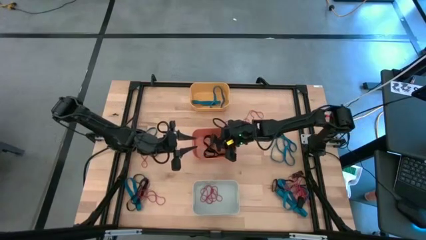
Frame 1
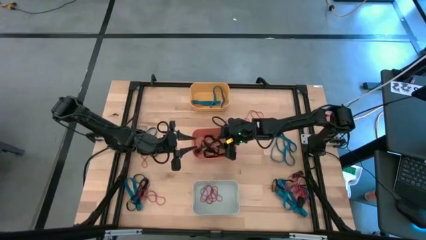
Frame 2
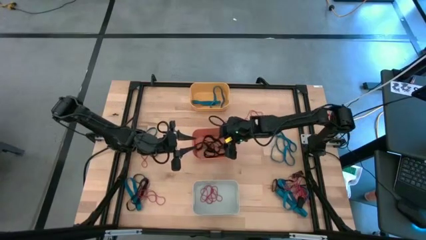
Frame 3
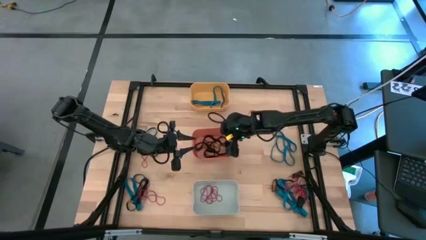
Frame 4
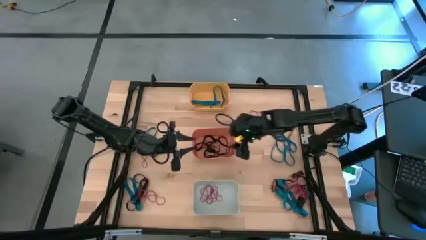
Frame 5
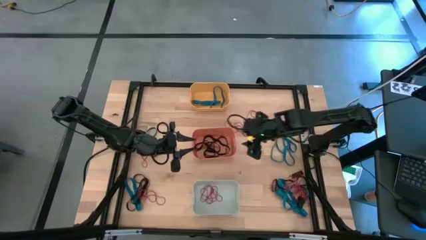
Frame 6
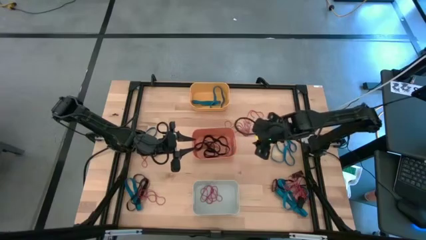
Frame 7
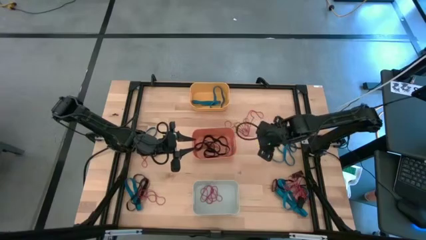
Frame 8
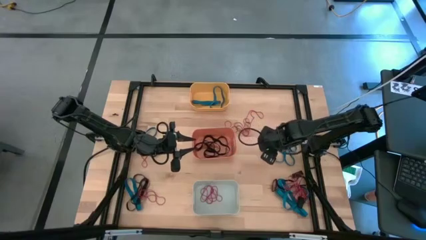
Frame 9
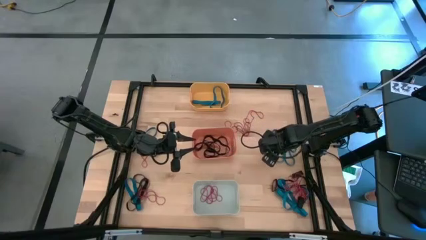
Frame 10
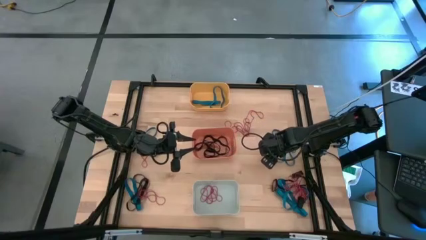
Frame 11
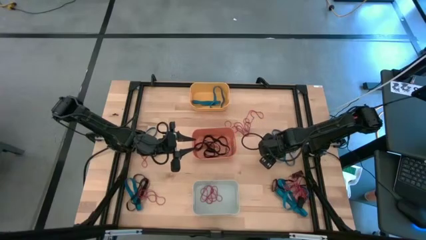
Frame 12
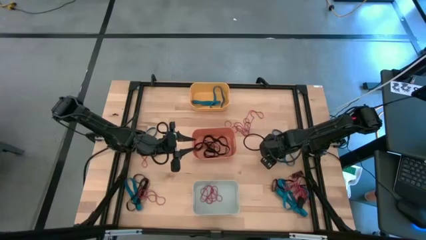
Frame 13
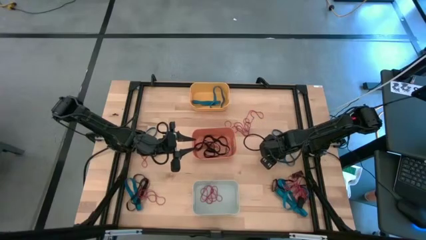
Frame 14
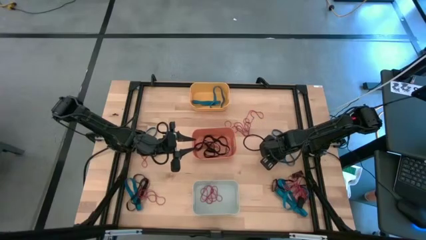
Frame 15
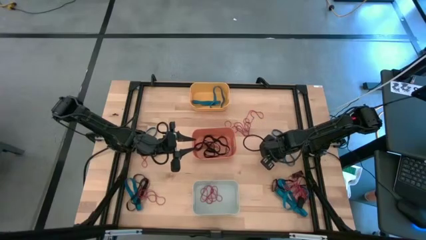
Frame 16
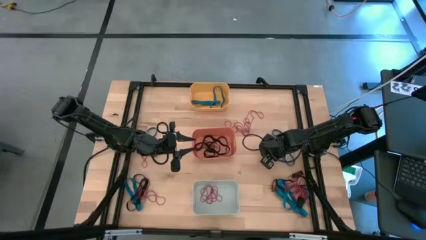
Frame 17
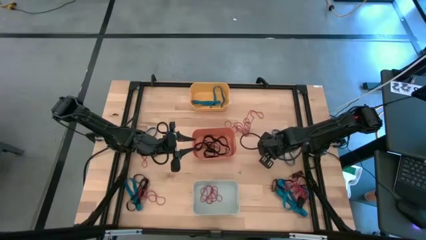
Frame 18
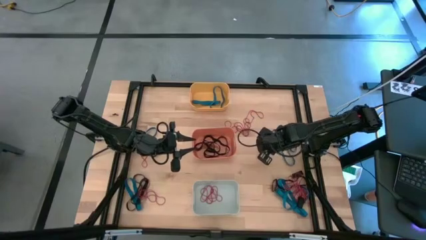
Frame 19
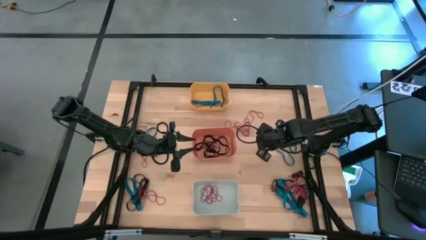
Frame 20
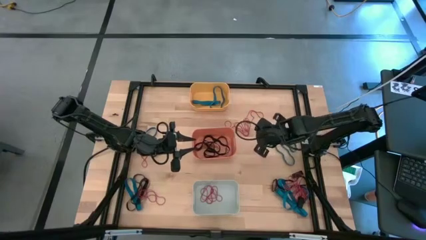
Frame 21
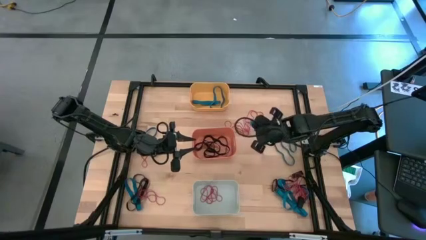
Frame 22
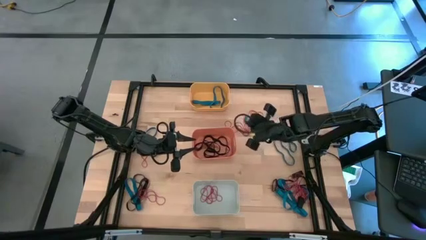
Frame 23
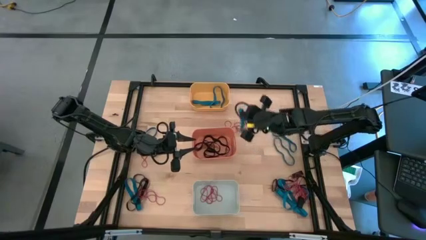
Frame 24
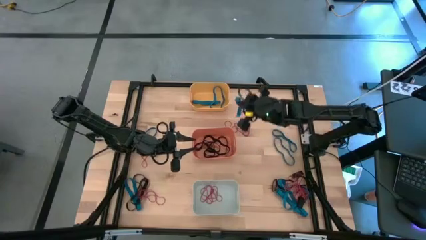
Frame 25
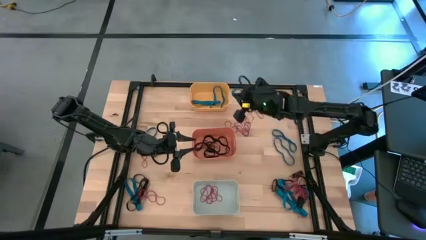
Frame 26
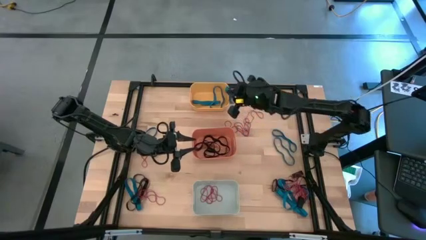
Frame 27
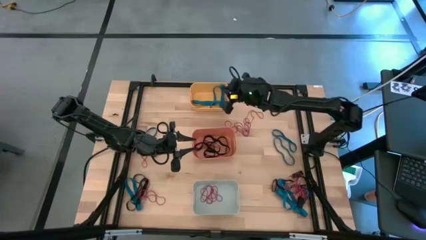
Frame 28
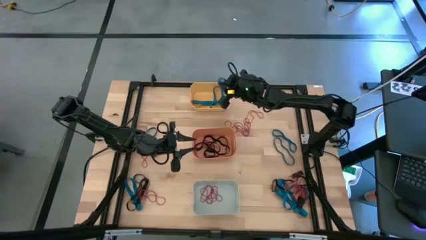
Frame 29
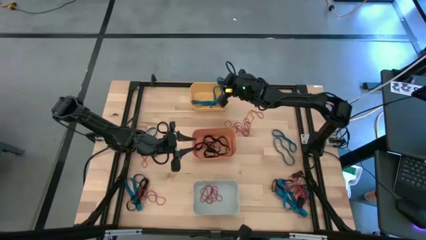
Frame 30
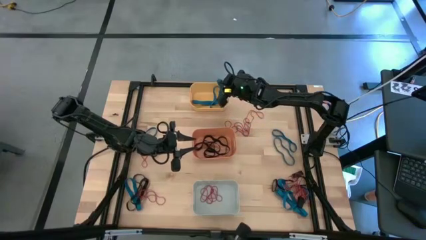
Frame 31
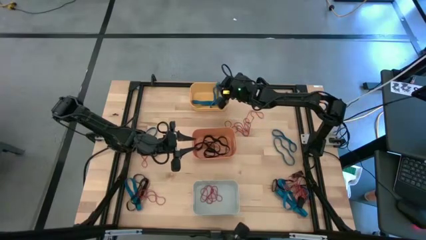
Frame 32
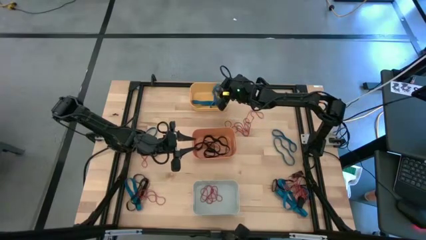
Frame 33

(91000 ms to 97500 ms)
Task: Sort rubber bands into baskets
Put the blue rubber band in the yellow bin

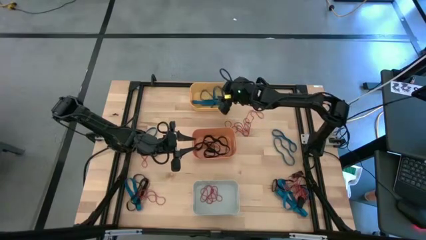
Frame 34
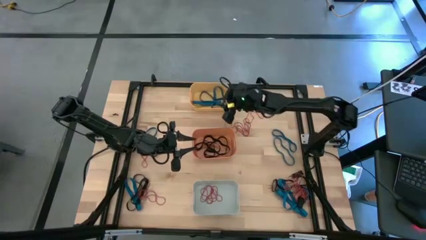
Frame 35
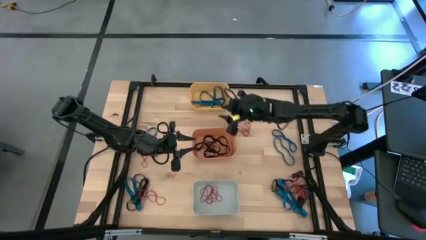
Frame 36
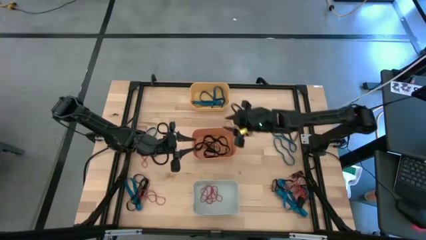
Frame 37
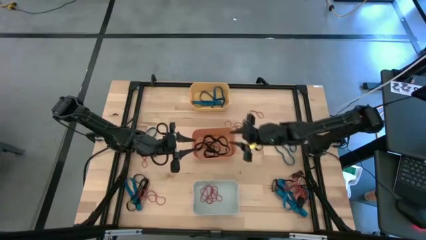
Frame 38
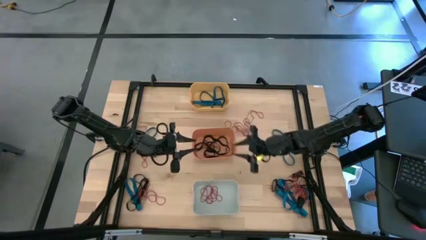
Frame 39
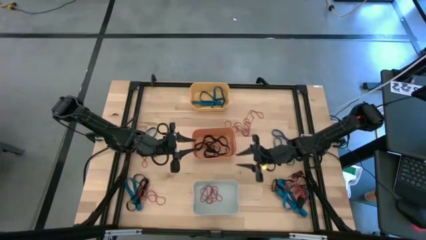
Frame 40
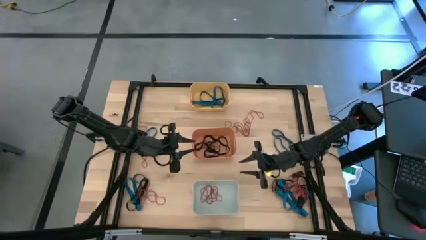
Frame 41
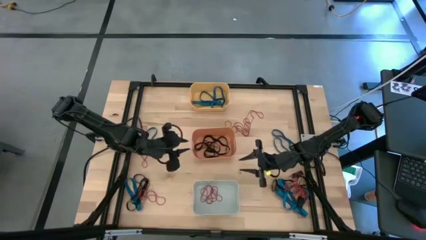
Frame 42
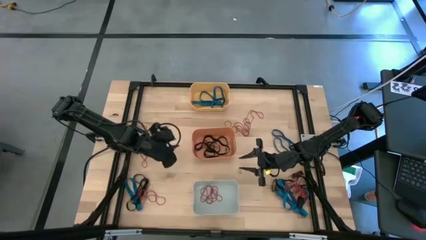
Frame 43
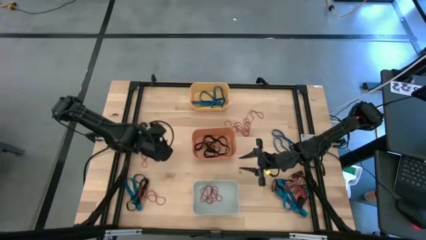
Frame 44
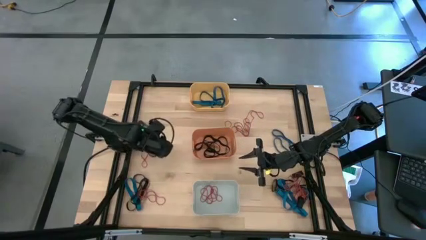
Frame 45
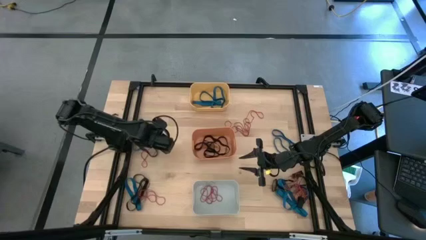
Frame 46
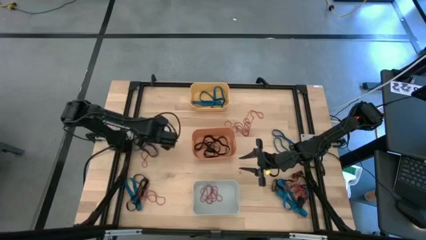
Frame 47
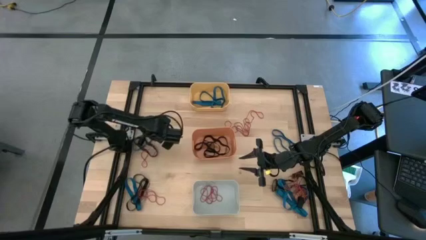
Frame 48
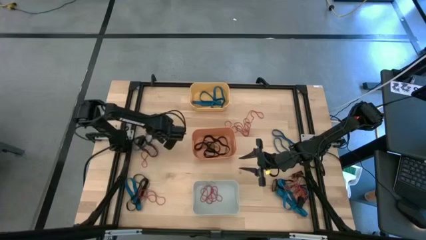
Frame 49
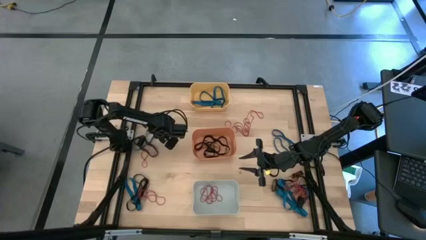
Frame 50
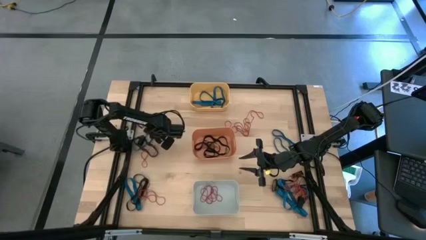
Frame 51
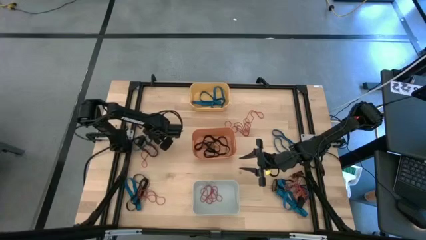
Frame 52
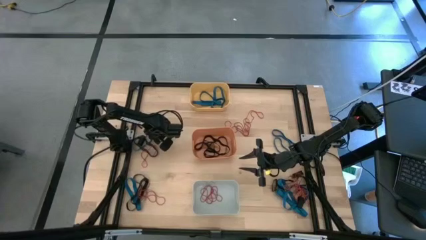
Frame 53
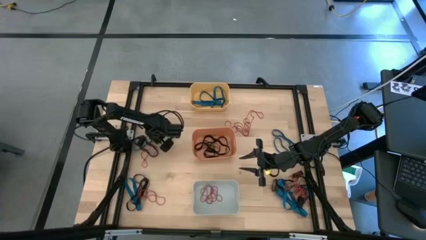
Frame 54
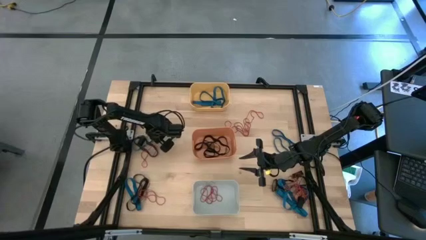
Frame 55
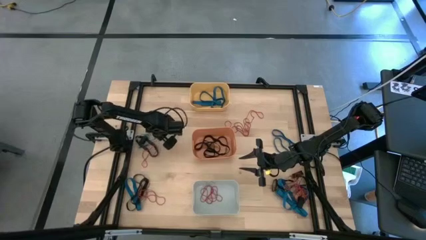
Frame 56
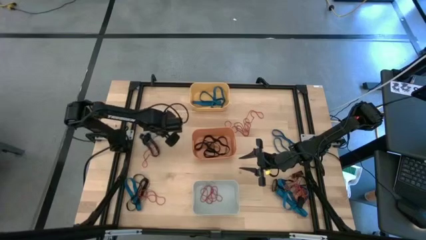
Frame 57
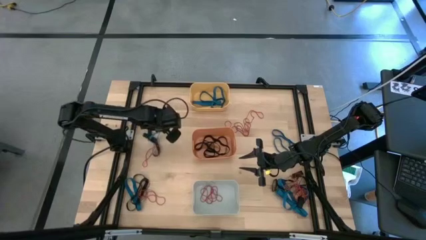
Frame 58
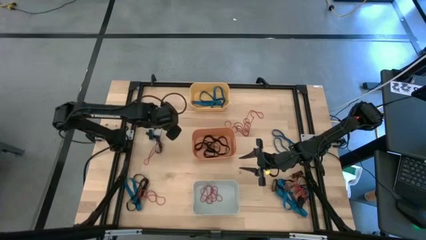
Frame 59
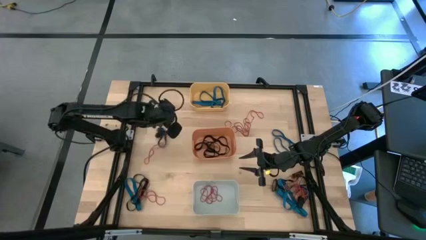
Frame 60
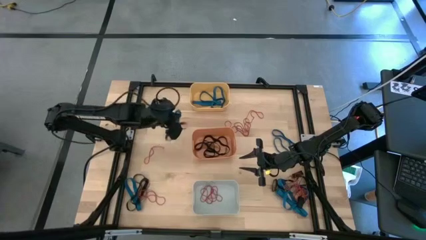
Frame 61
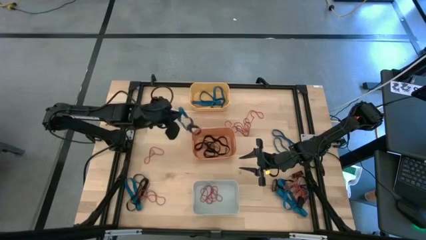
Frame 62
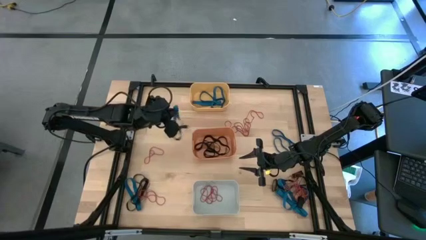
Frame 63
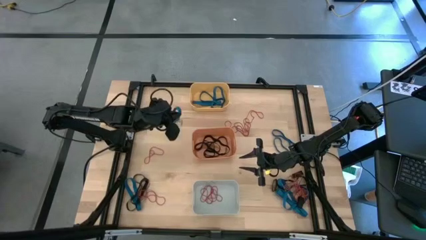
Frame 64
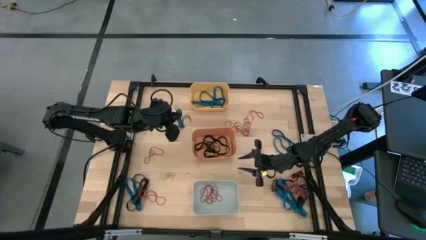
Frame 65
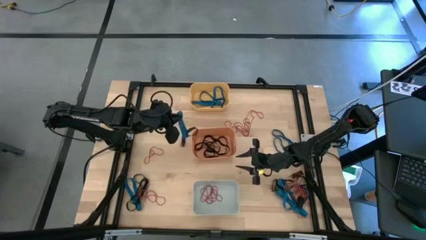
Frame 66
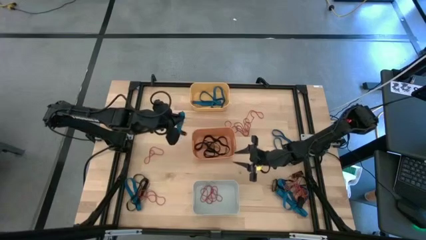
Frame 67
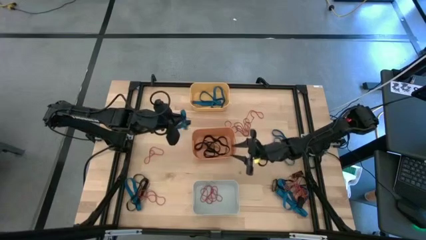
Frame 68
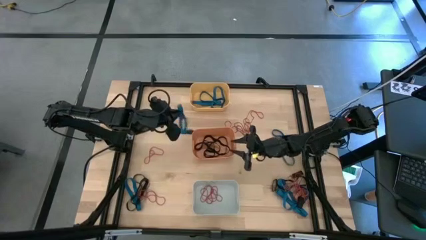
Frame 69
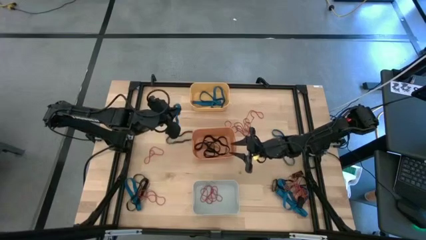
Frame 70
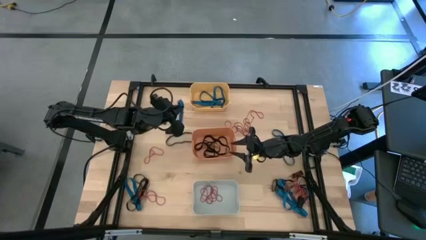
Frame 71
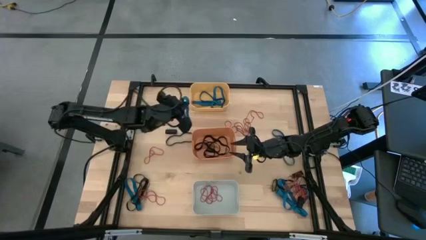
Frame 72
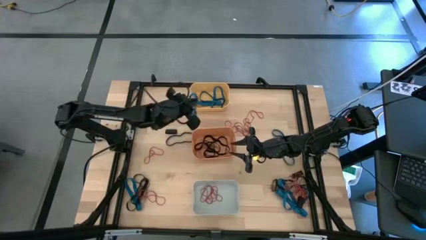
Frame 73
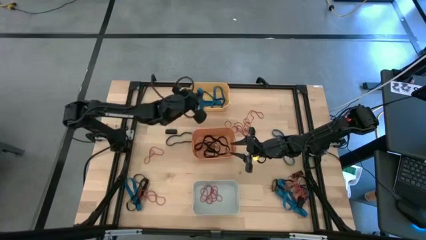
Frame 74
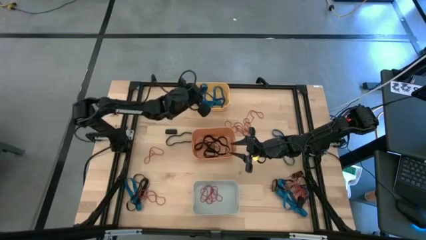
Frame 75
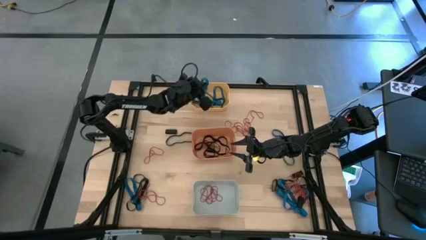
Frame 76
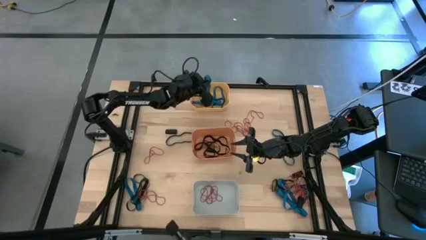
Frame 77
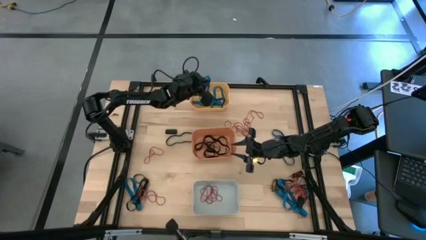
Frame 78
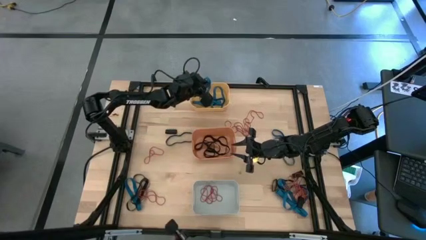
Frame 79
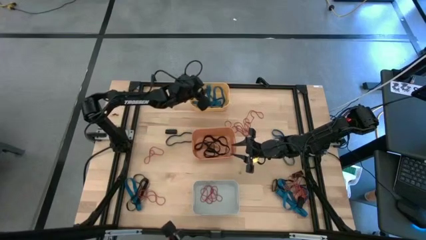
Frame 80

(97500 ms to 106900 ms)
Put the blue rubber band in the yellow bin
